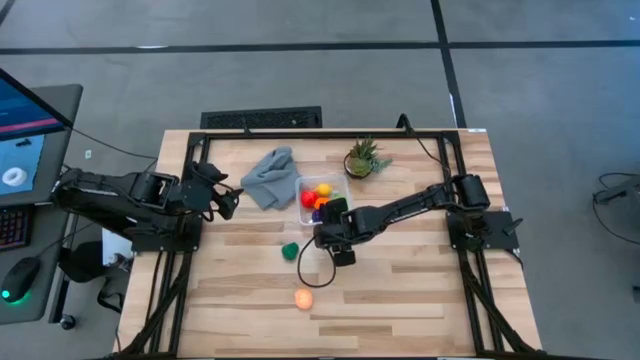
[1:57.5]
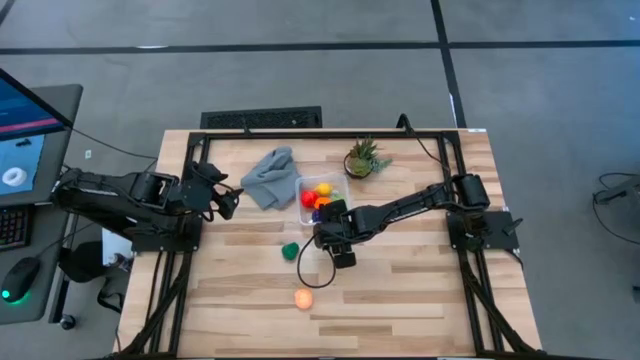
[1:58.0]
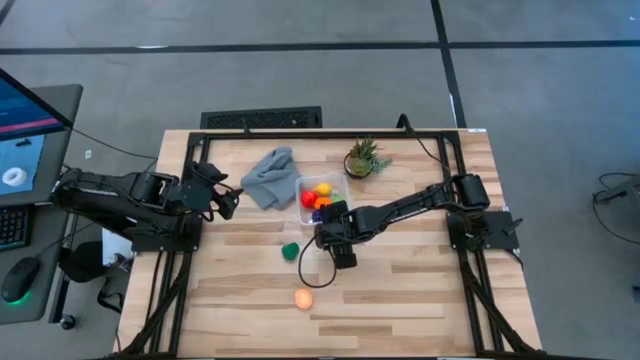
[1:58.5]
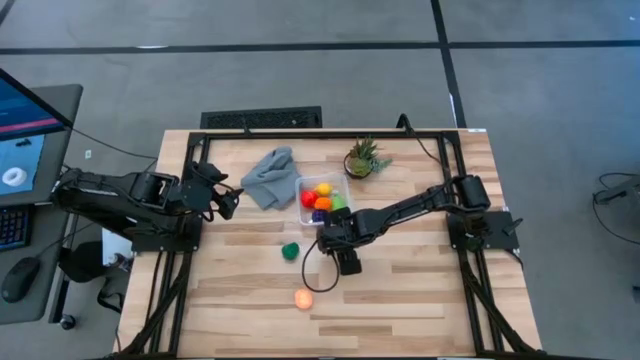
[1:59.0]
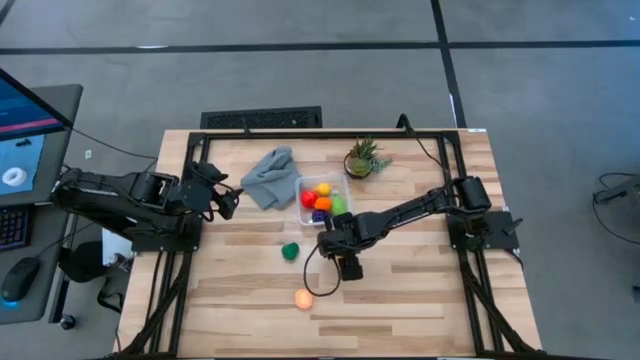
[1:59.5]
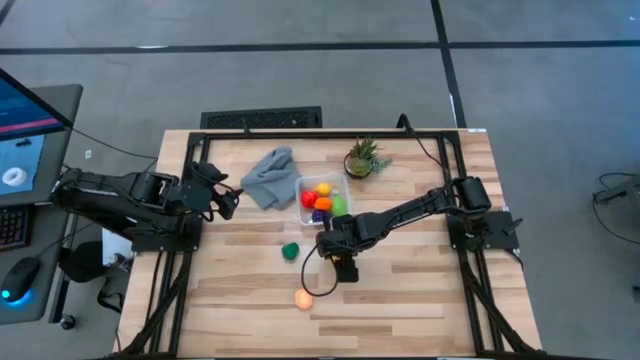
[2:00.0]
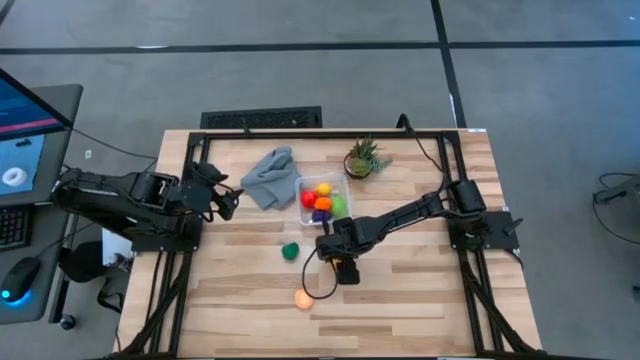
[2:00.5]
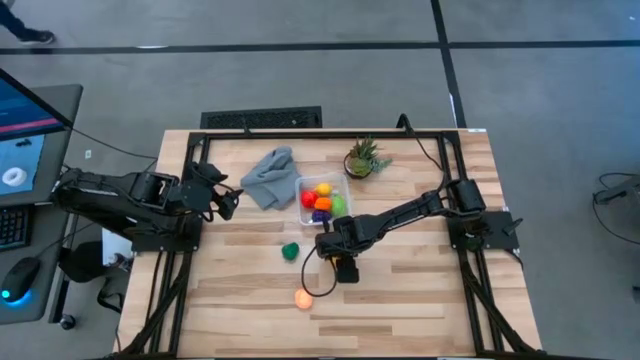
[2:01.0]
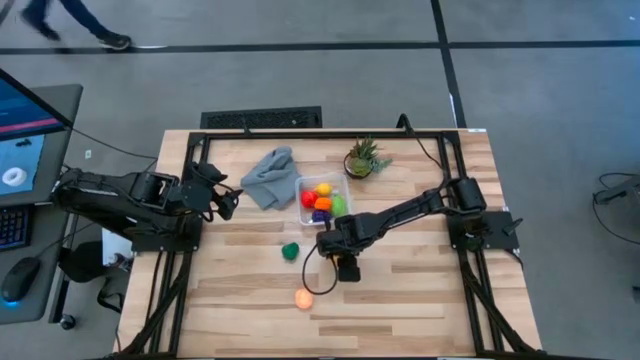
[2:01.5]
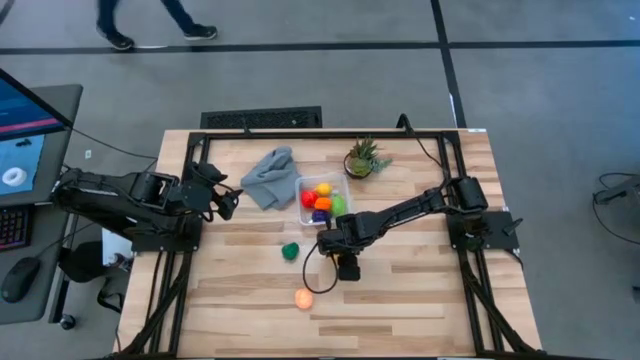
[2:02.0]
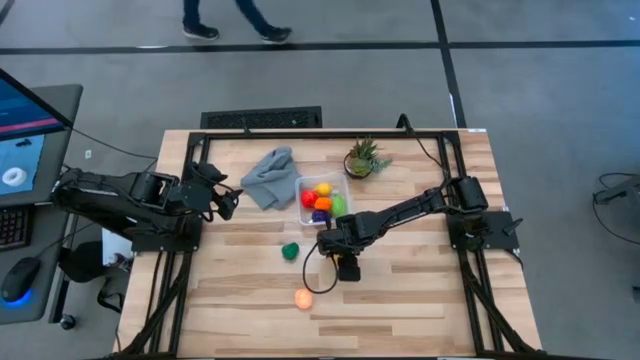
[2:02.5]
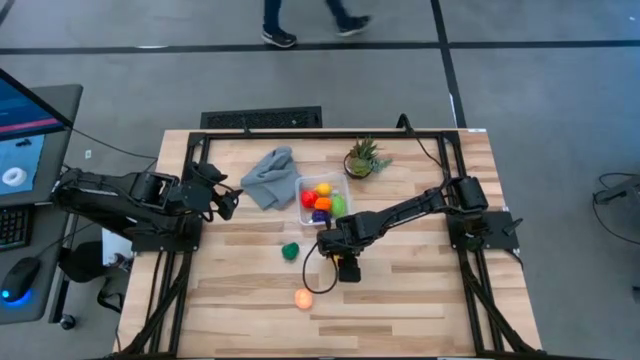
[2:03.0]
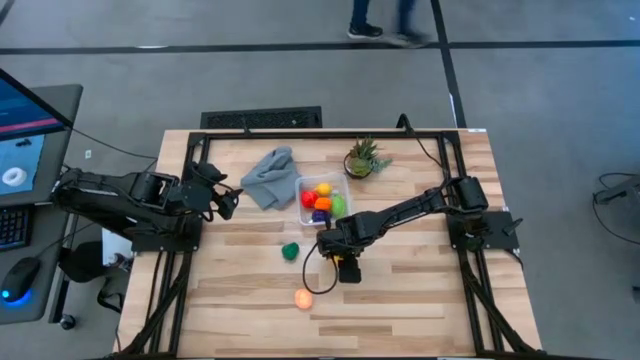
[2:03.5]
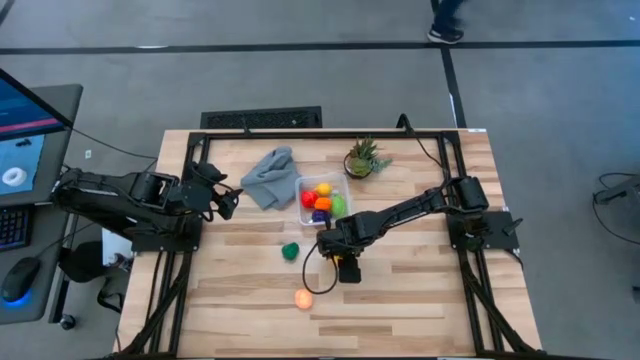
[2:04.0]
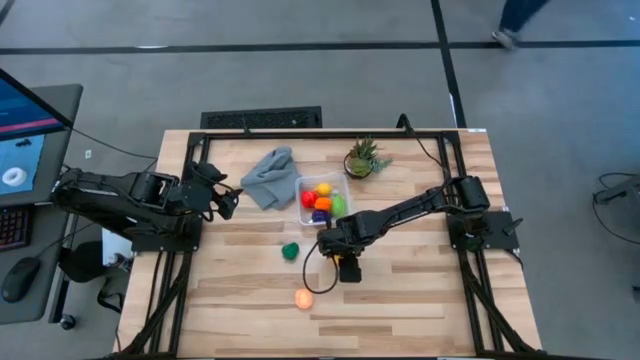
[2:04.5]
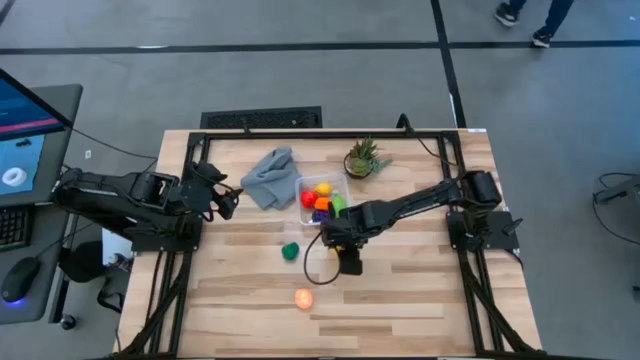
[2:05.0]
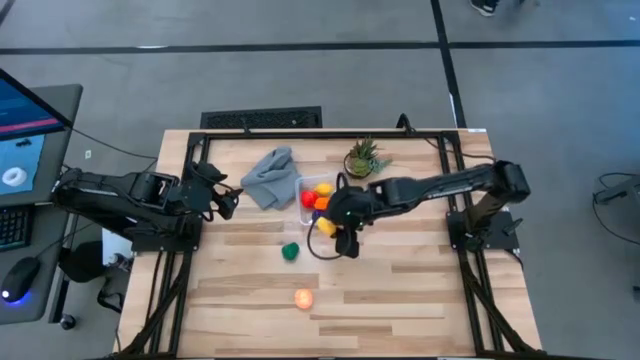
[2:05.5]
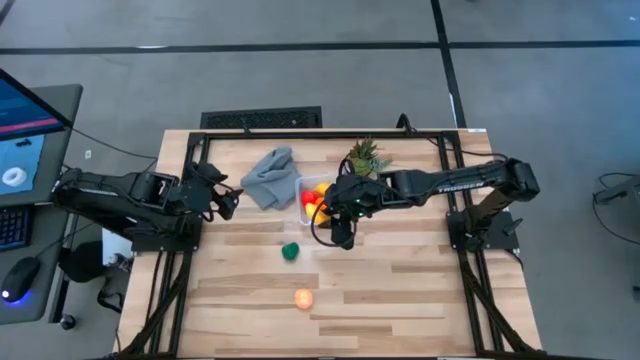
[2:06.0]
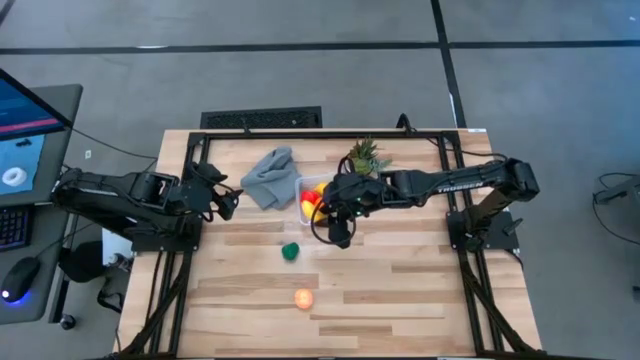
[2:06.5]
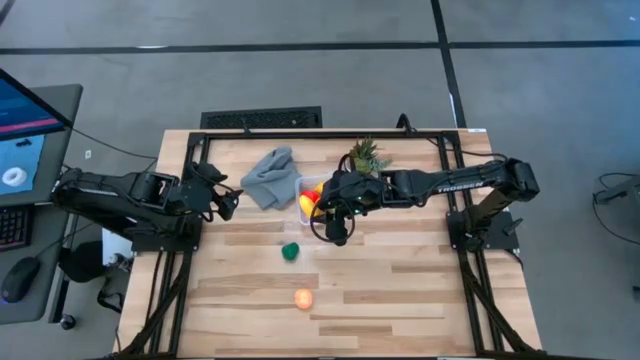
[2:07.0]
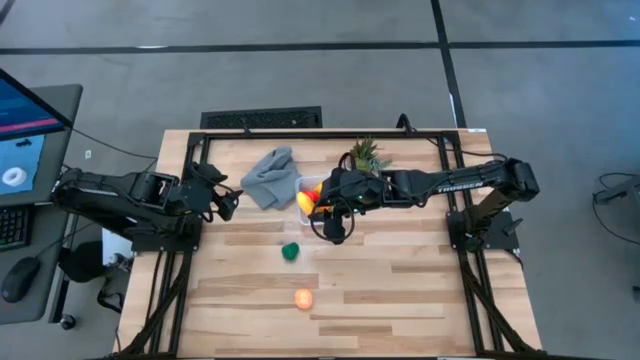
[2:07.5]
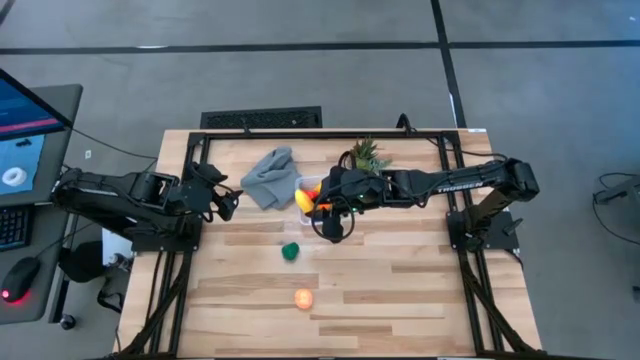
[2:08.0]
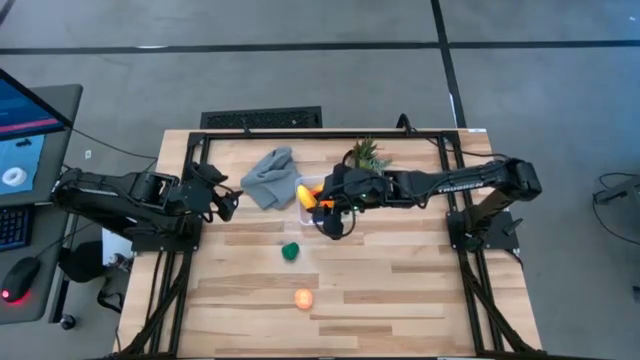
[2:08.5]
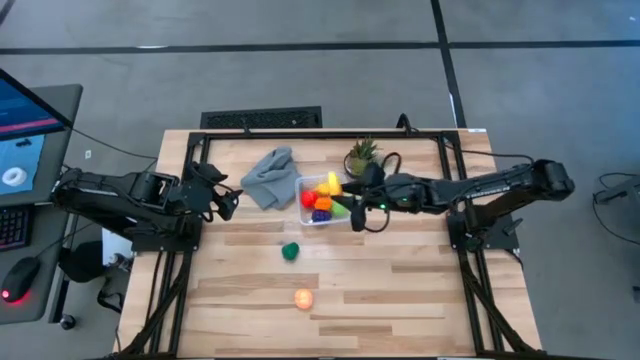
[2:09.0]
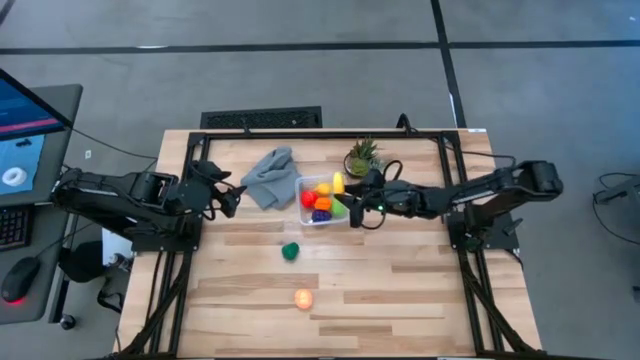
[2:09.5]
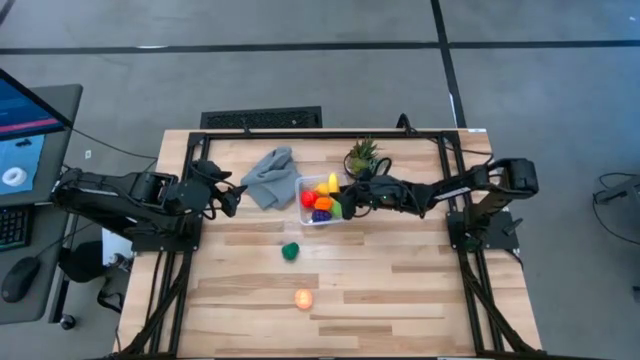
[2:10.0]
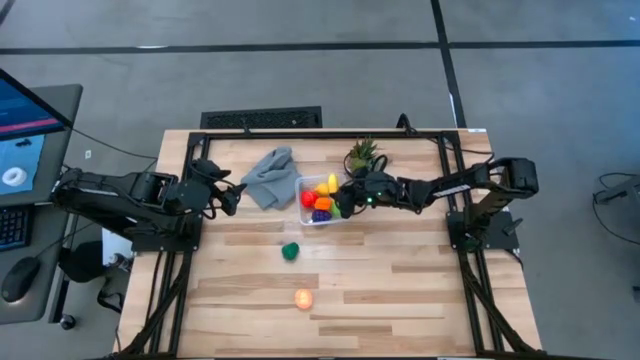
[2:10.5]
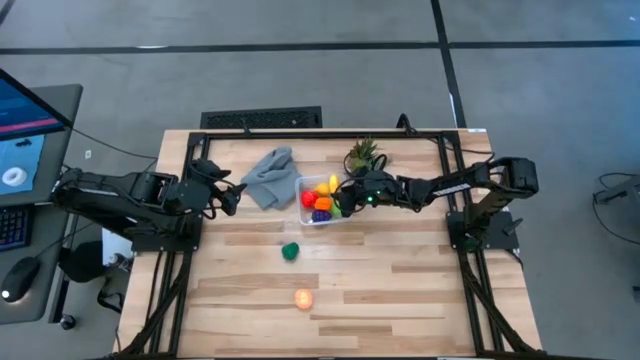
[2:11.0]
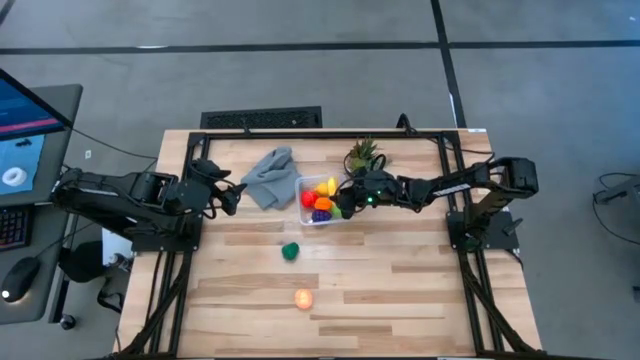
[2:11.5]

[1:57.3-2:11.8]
Task: Pick and placing Produce into tupperware
Put the yellow banana into the transparent bin

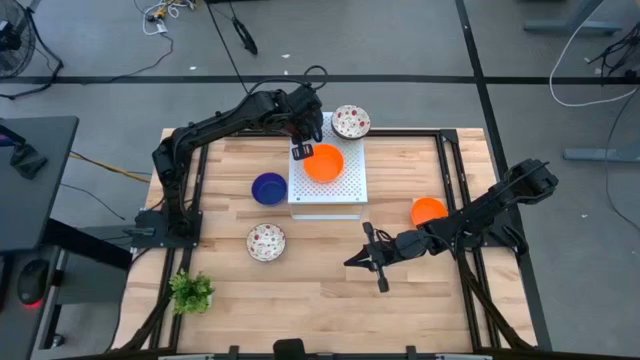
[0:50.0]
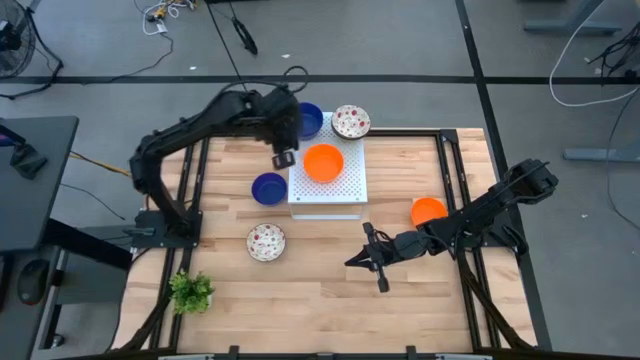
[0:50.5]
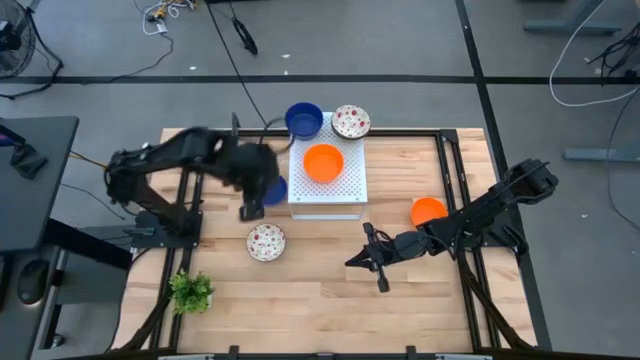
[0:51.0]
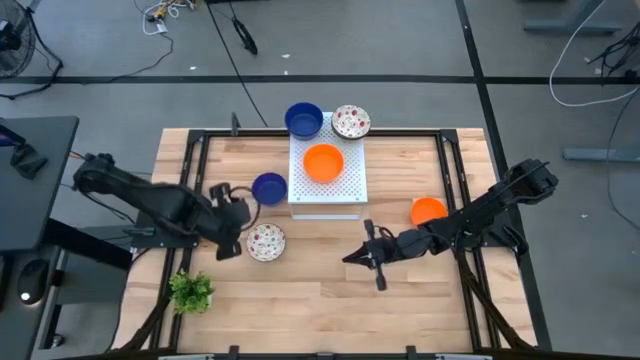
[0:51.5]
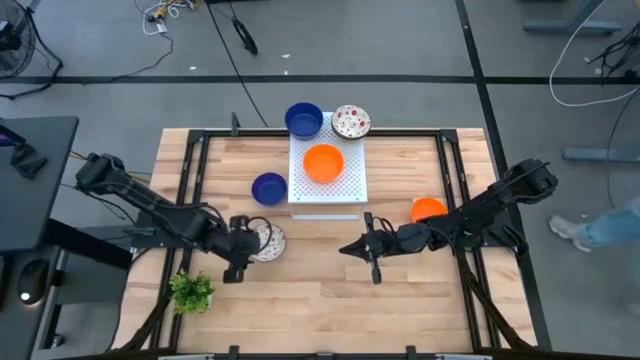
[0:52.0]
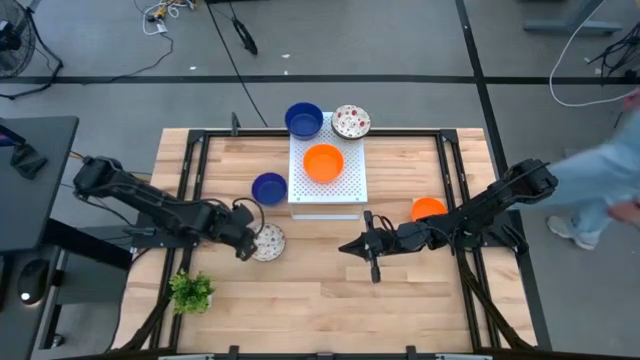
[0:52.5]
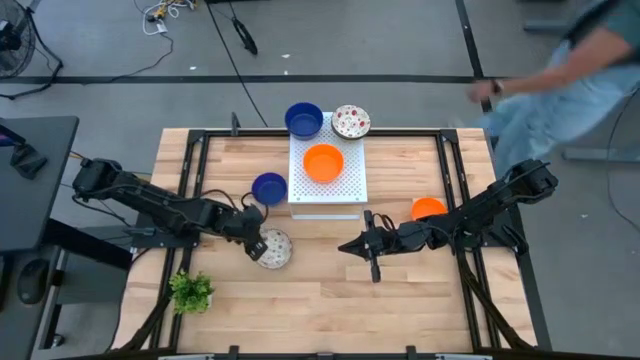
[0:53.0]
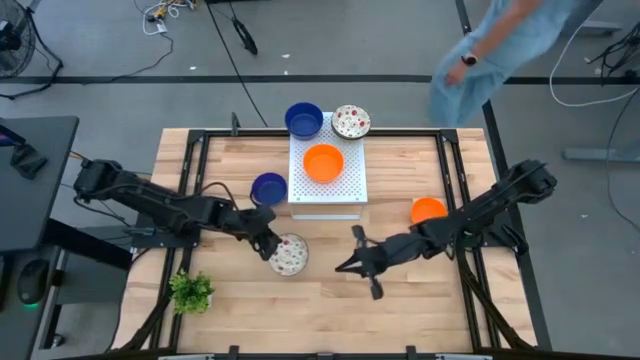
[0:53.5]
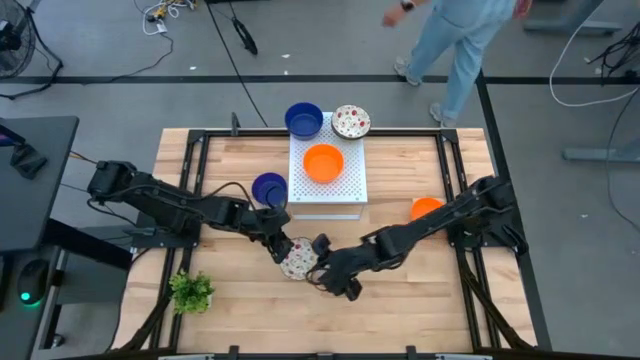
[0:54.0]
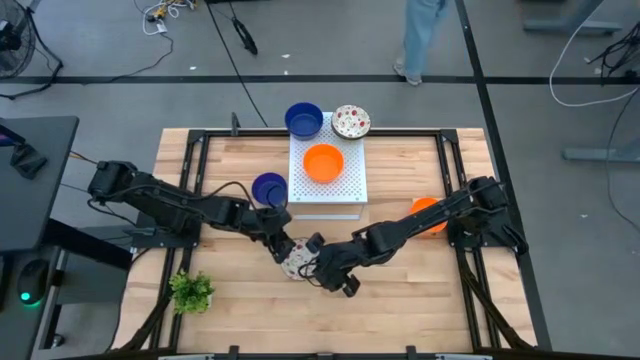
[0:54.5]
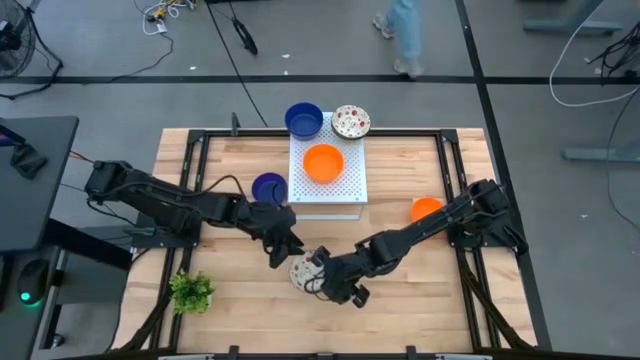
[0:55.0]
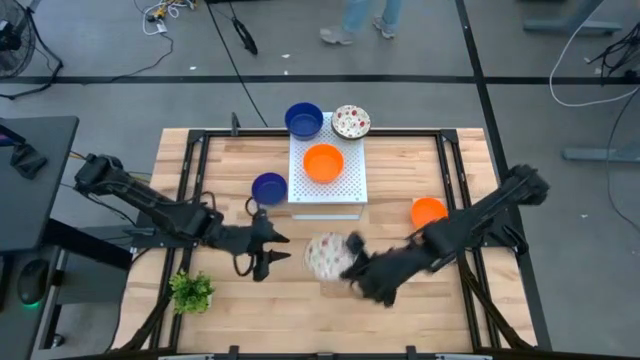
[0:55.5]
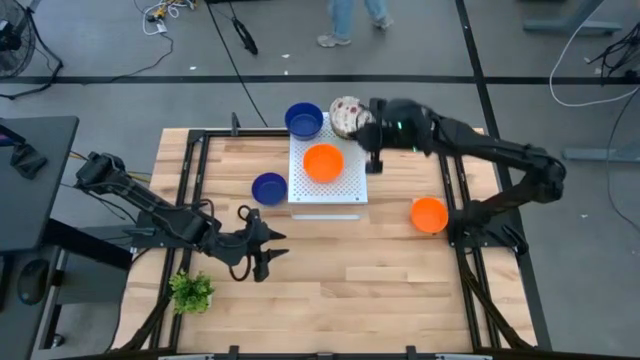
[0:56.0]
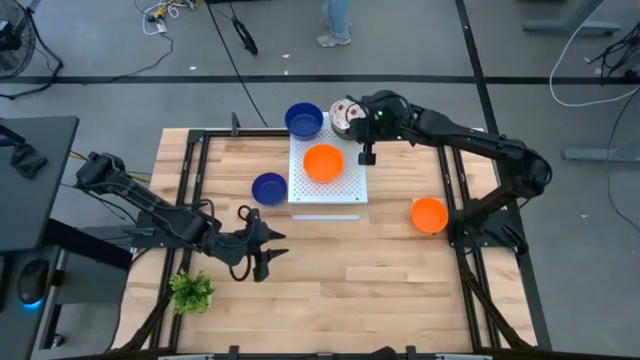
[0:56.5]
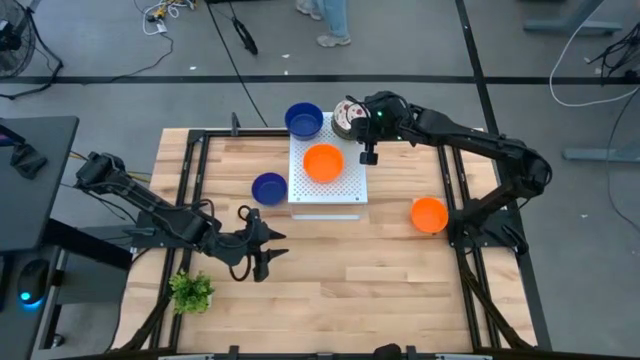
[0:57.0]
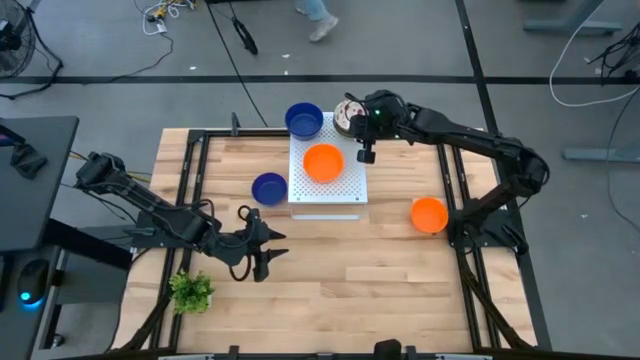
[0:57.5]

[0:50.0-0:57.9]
Task: Pick & Place Mini bowls
Stack the white patterned bowl on the other white patterned bowl on the shelf
